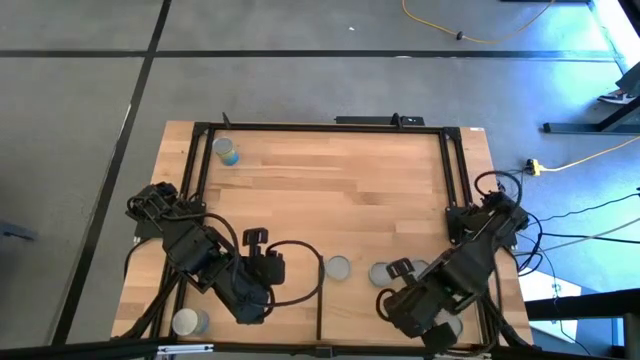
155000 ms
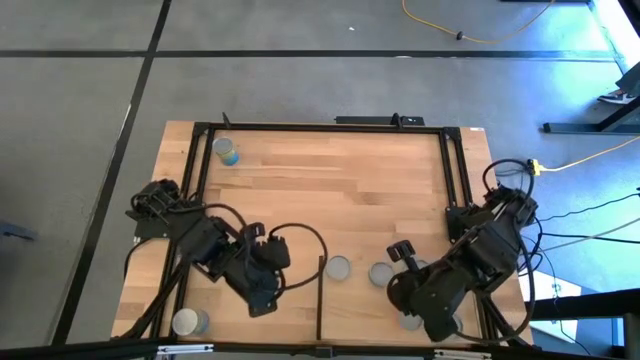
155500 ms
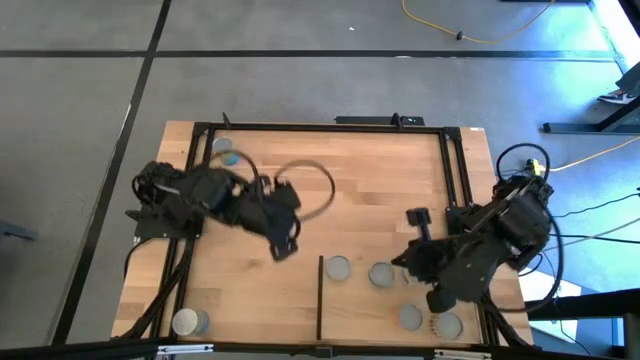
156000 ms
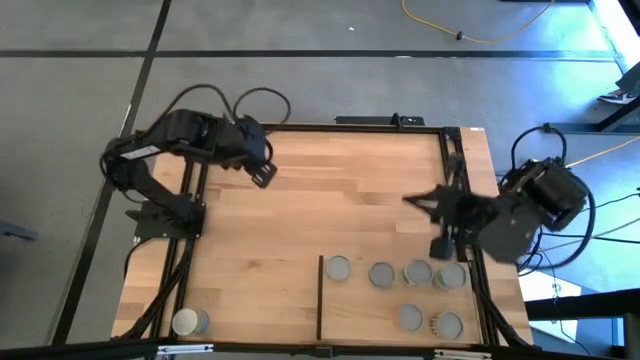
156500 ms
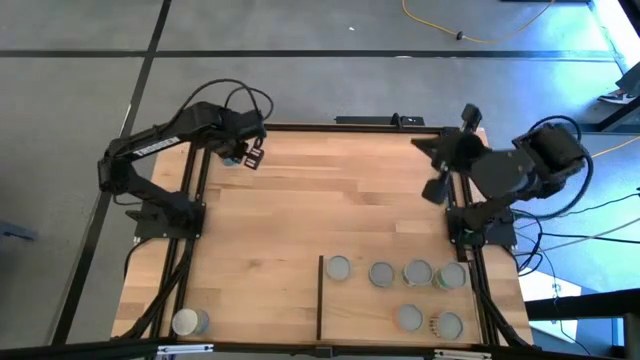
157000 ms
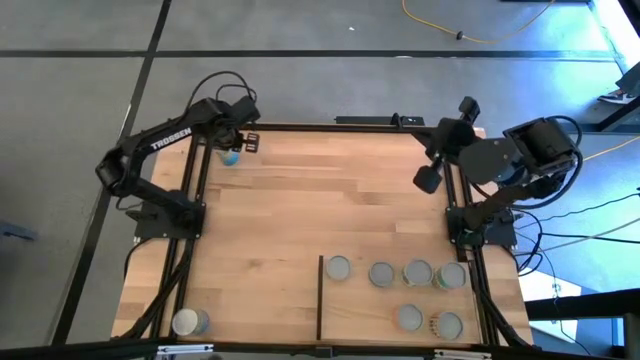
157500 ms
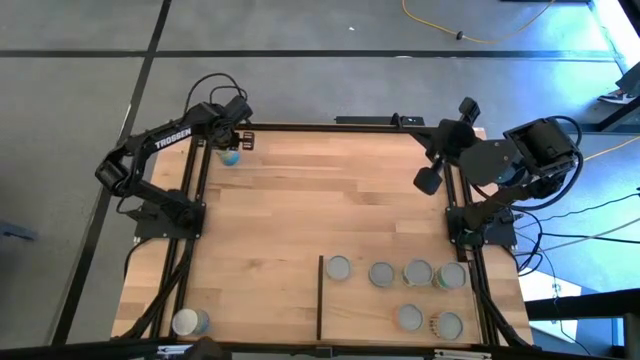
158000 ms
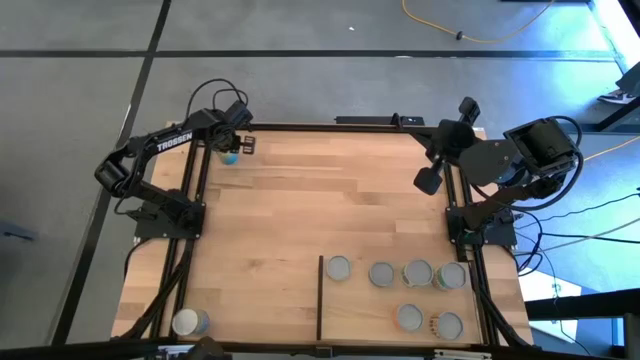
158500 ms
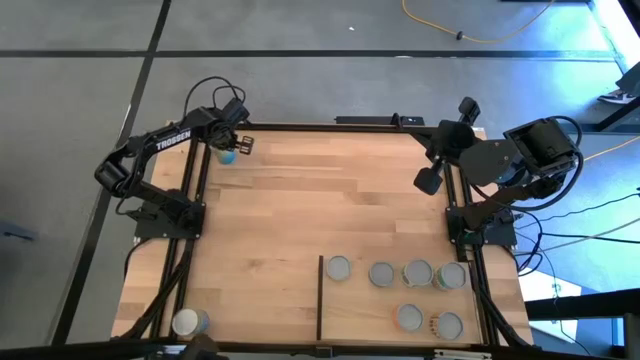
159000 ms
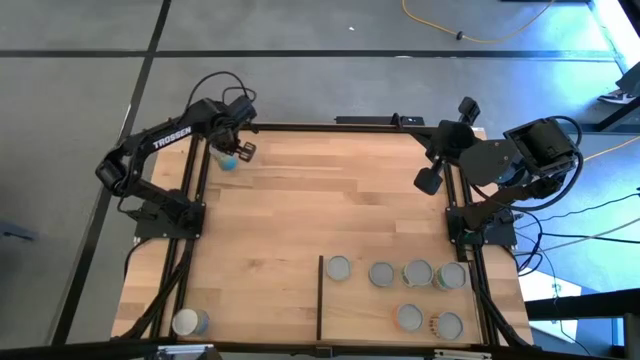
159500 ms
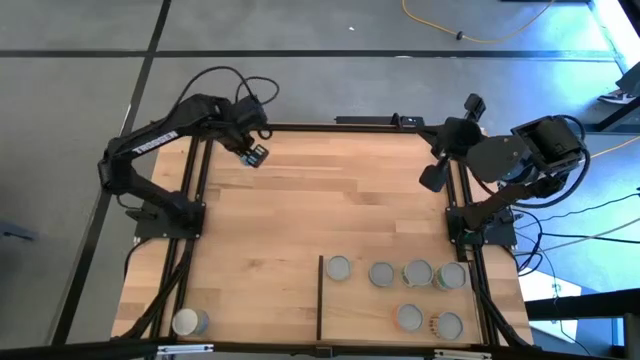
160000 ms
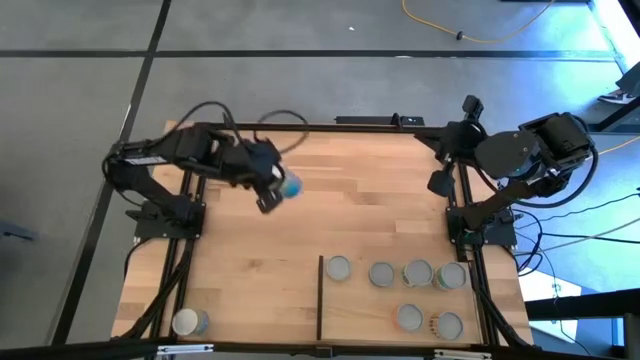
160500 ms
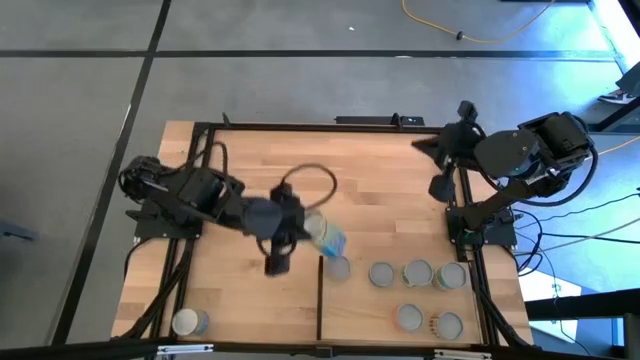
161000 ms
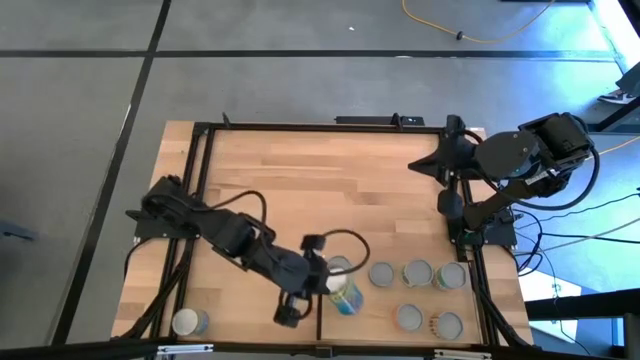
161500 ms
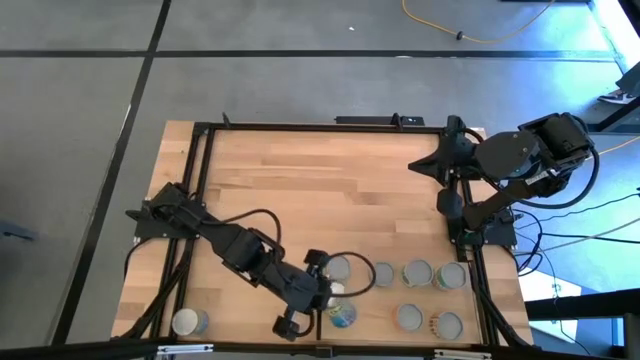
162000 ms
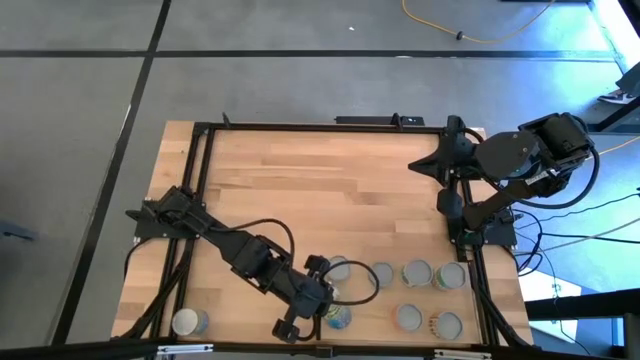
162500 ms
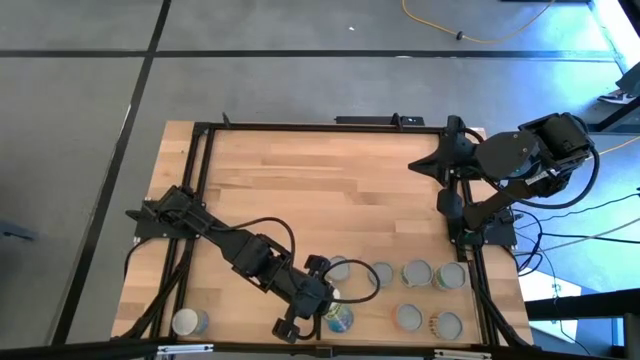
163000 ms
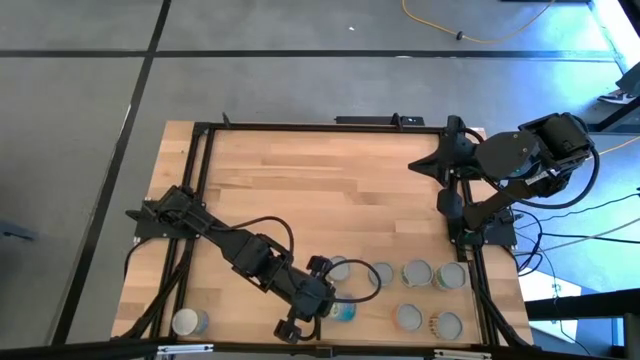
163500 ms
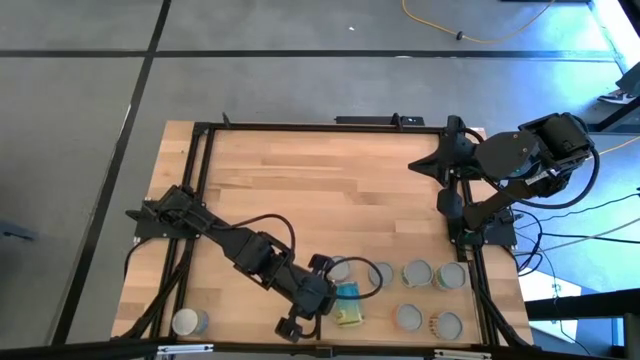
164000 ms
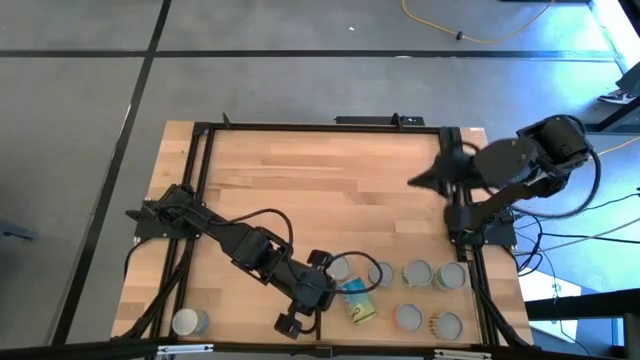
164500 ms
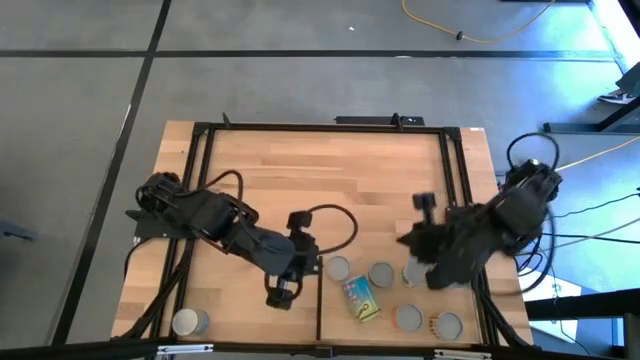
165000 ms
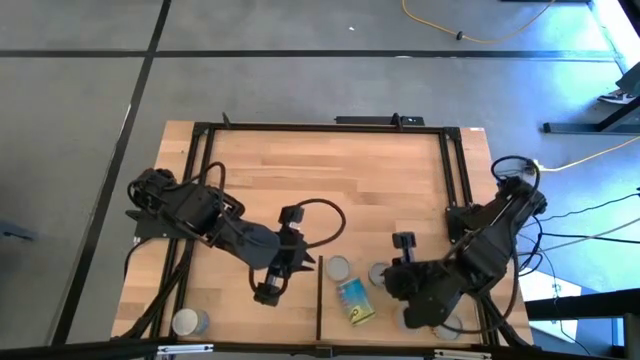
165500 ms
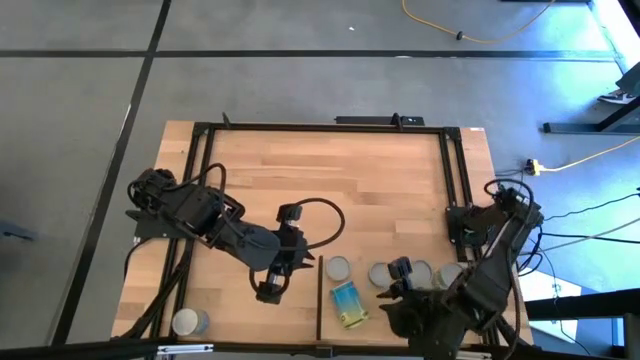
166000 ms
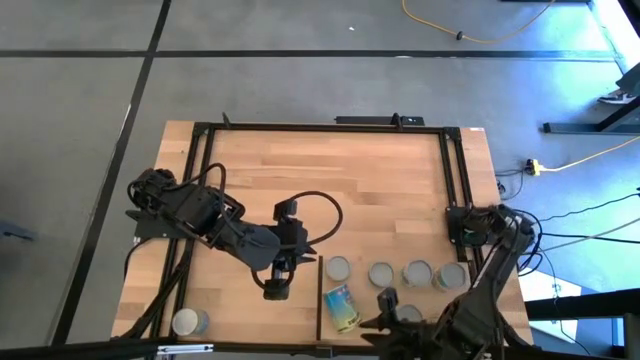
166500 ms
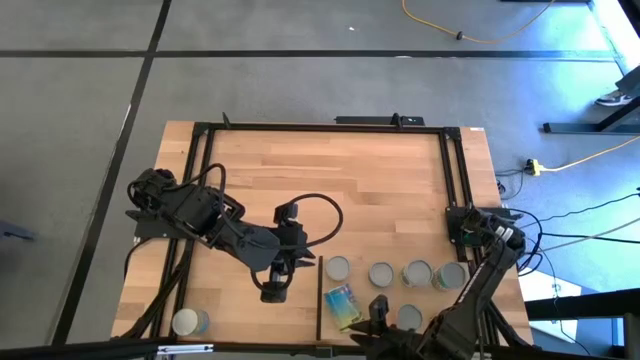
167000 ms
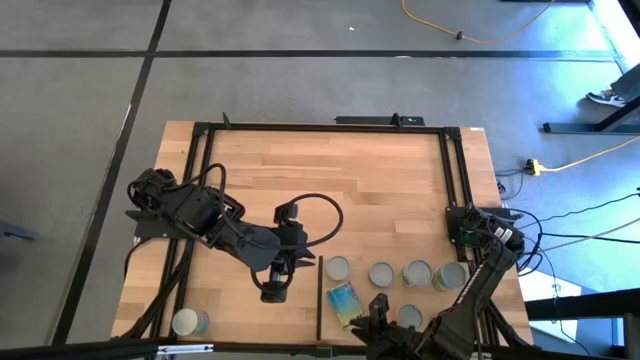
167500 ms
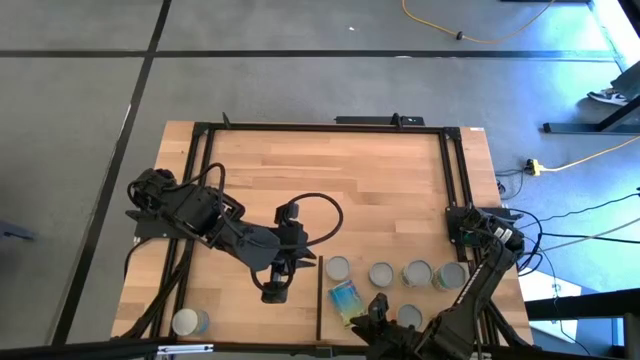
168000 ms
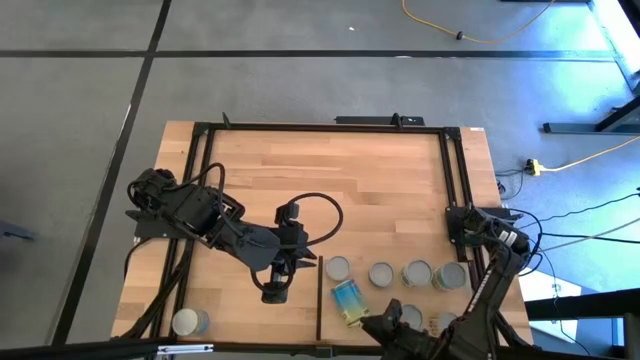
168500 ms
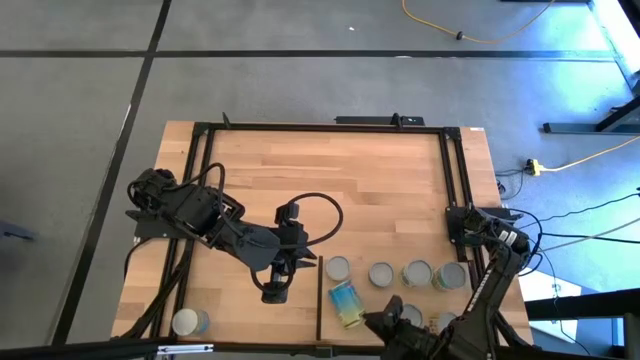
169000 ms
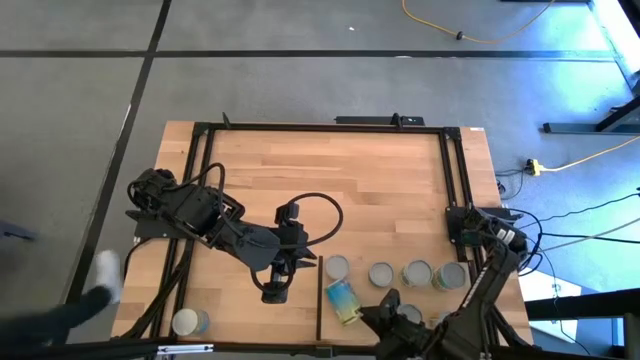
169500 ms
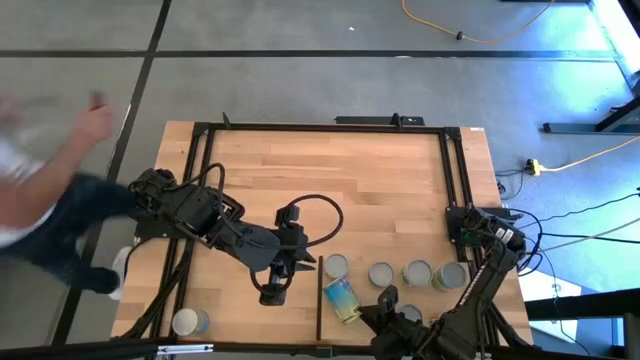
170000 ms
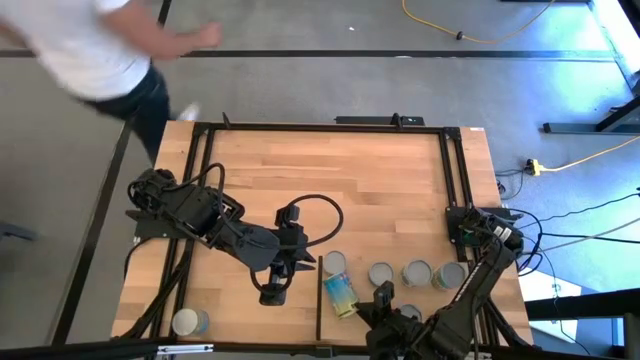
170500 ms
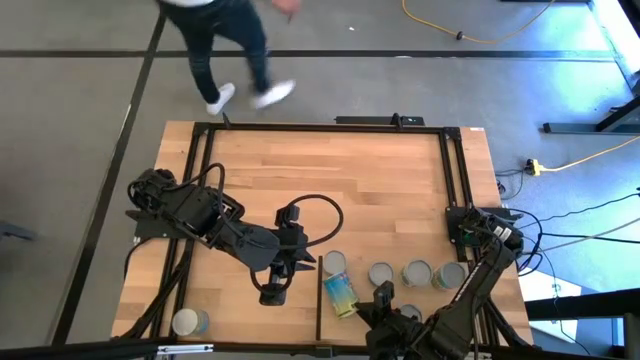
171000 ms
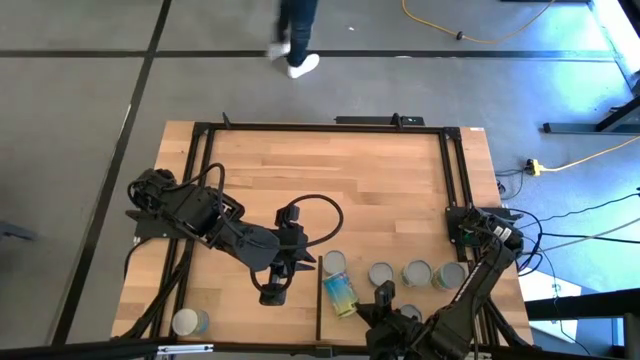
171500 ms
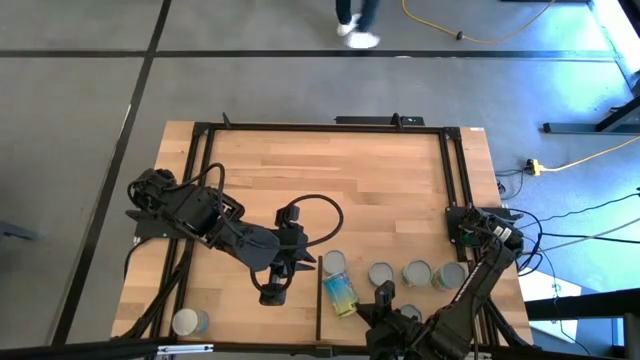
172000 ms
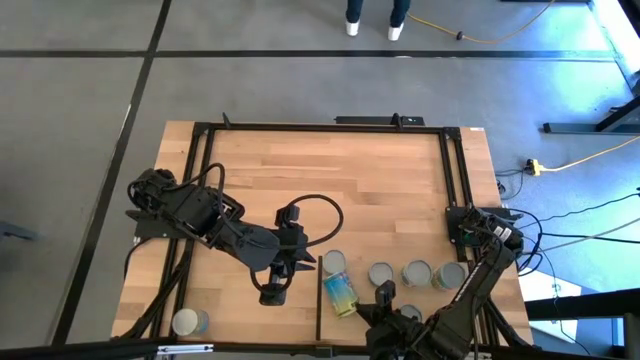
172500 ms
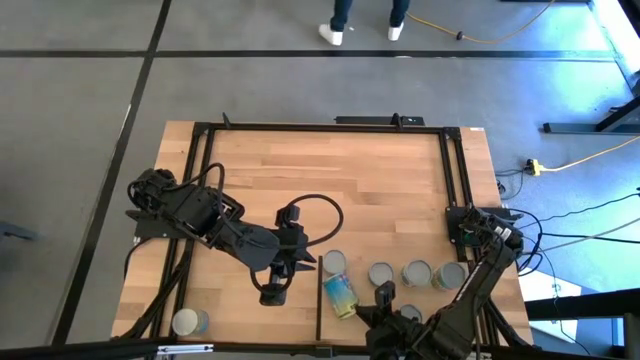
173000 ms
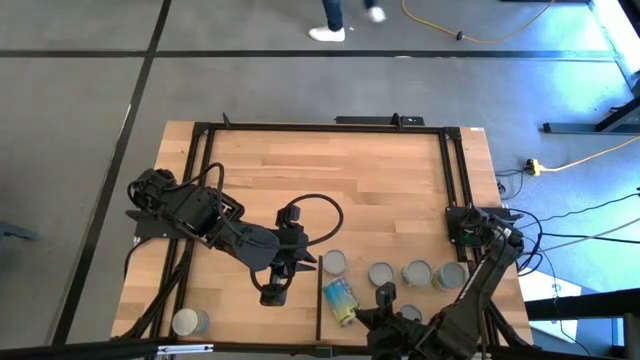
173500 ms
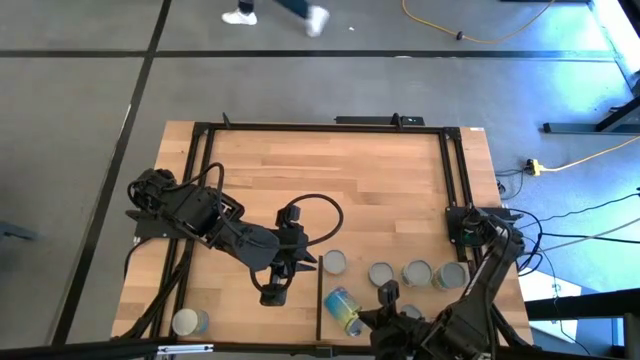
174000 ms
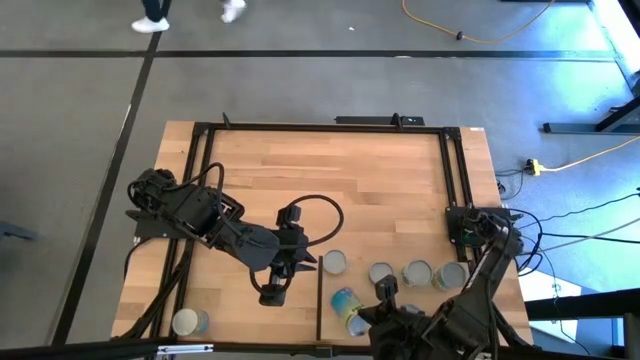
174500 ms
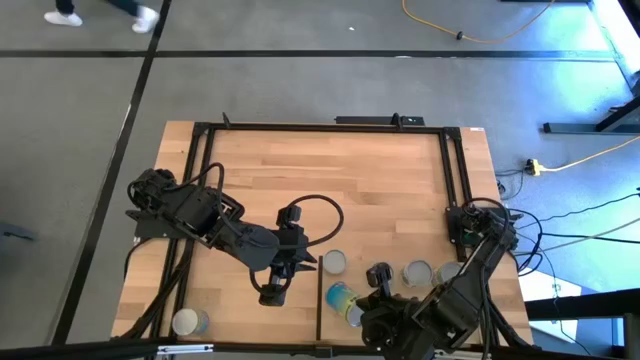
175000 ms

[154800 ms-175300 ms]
Task: Pick and place cans onto a shelf
Put the top blue canned cherries on the shelf aligned with the other green tuna can
